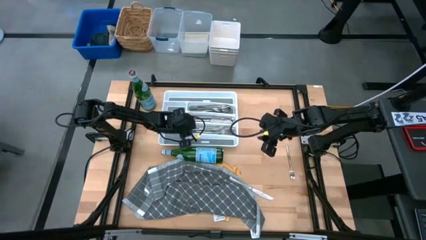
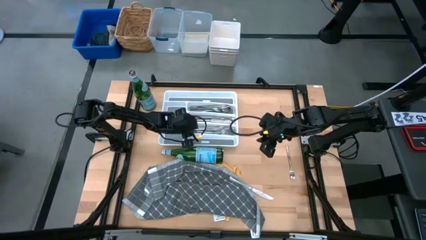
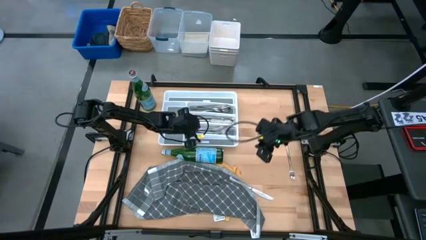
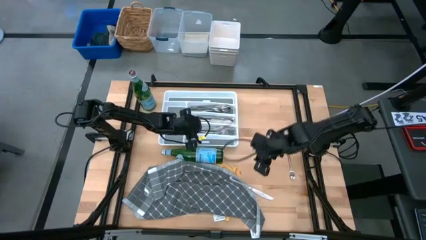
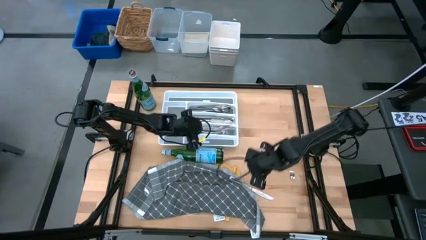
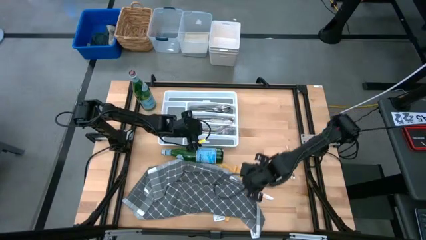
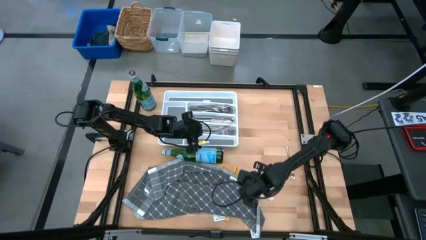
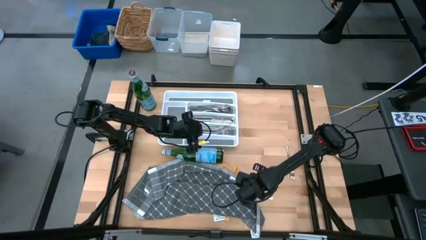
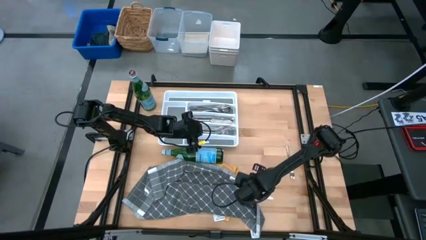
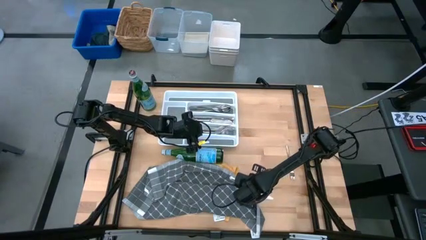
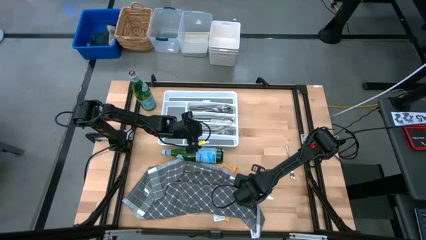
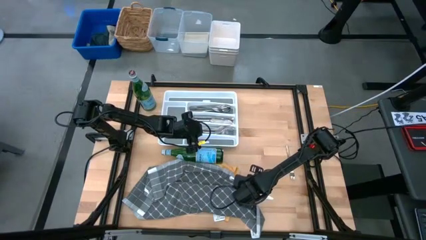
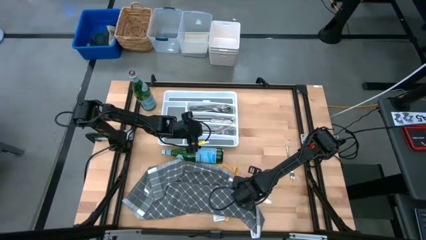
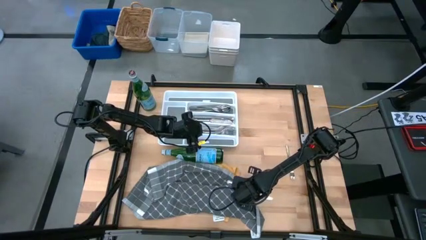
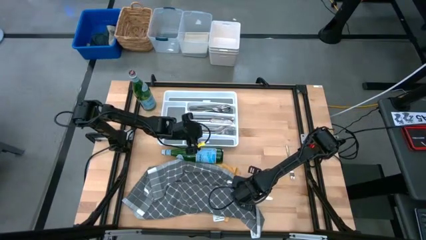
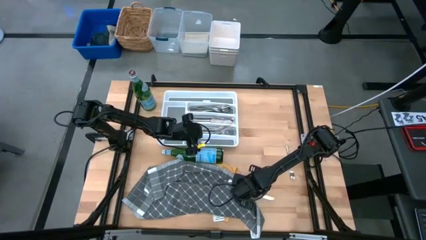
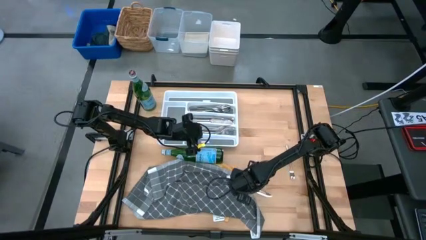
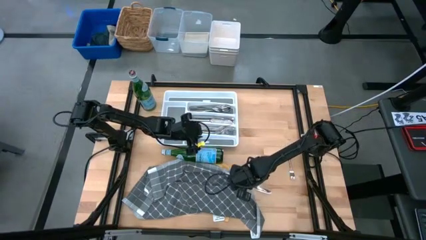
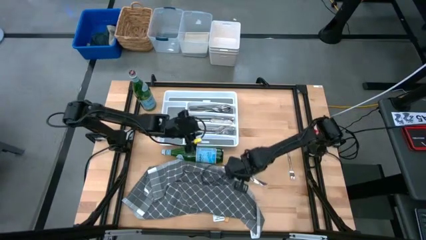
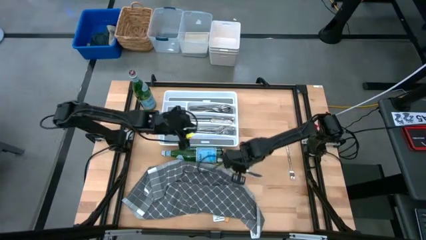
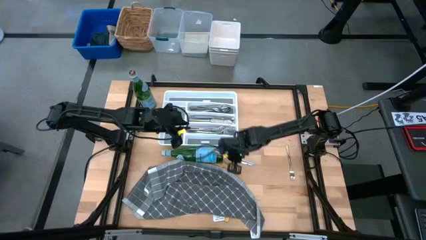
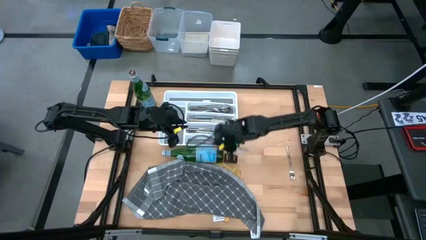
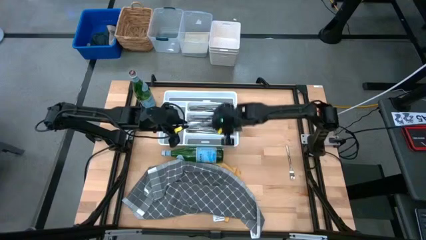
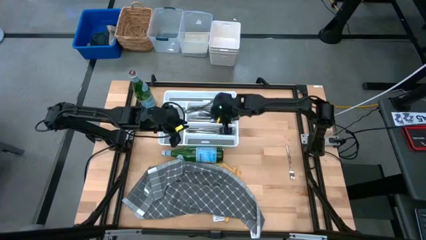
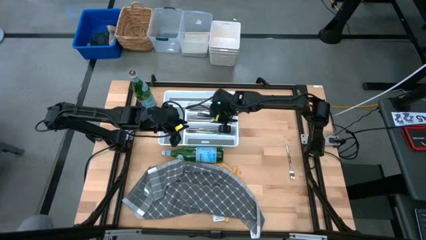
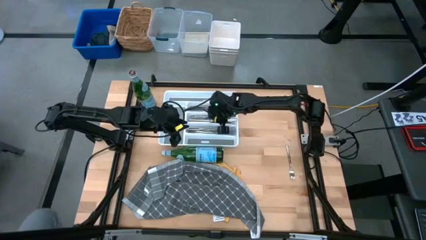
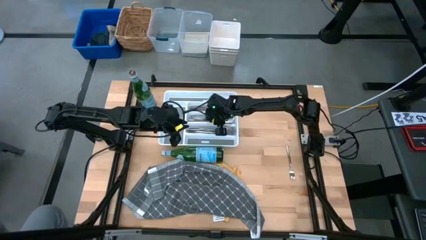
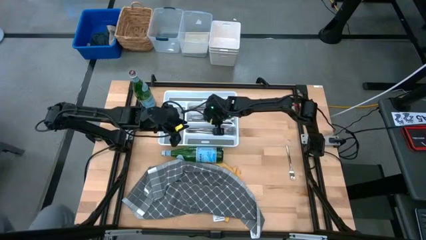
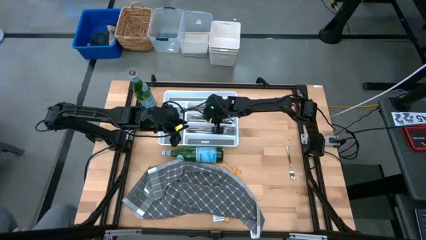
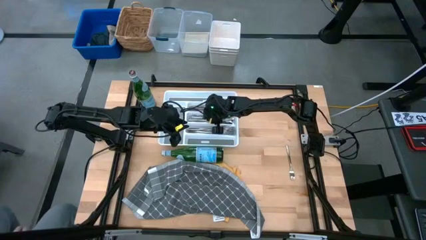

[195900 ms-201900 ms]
Task: Sort silverware
Put the silver table knife into the silverware tray

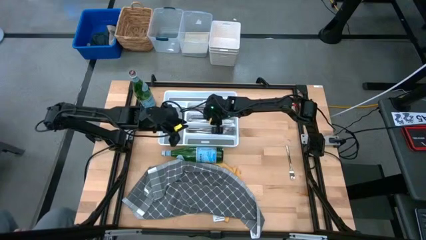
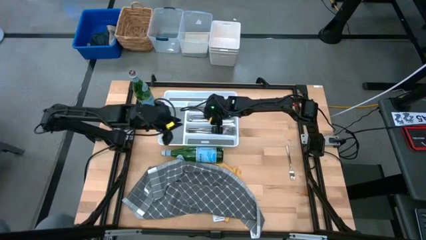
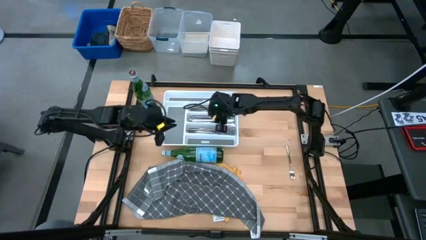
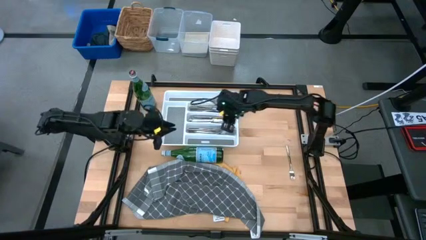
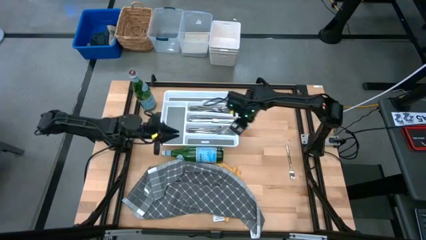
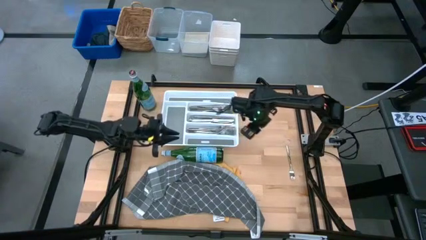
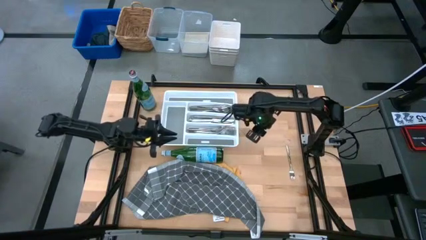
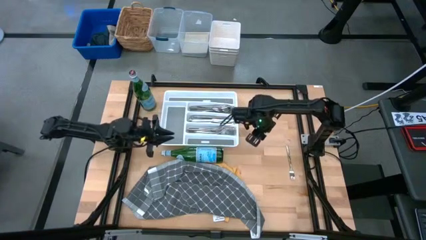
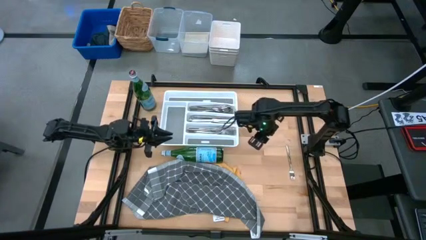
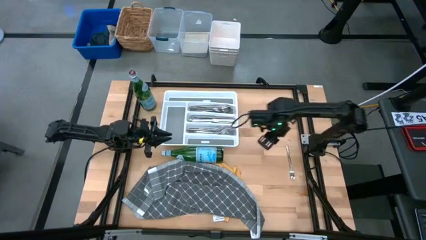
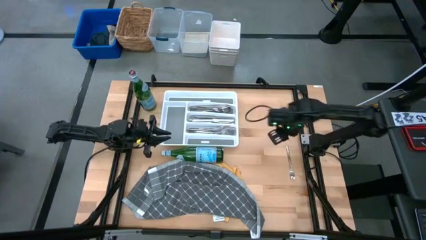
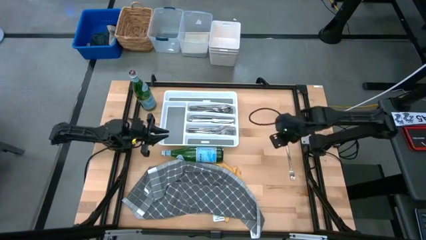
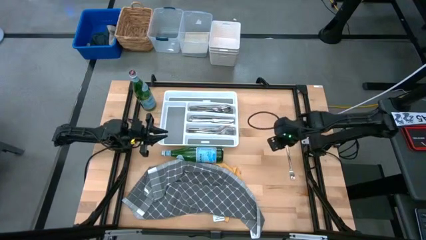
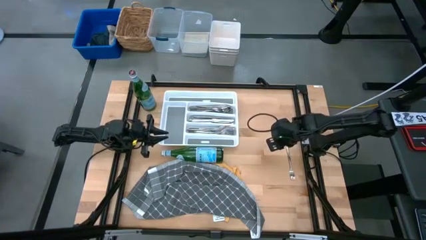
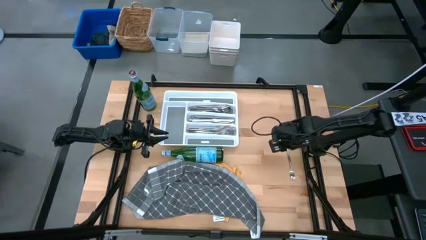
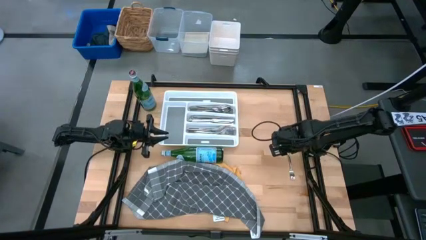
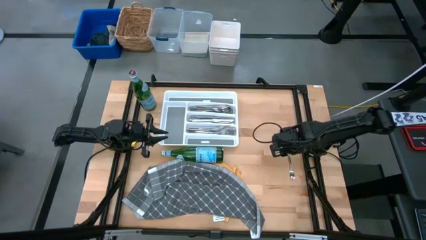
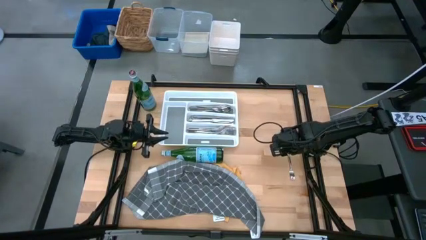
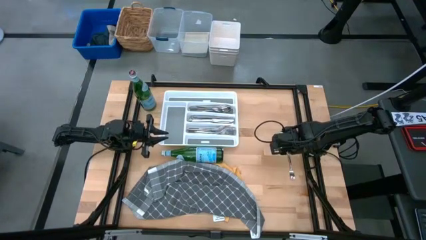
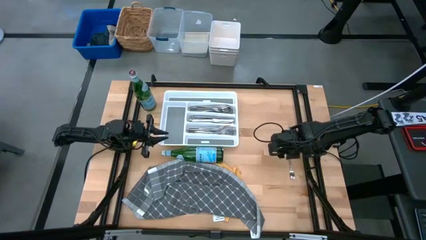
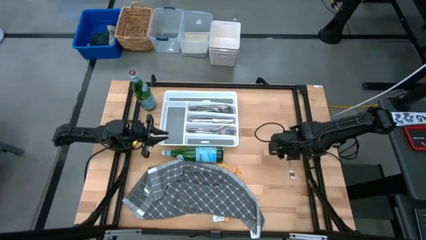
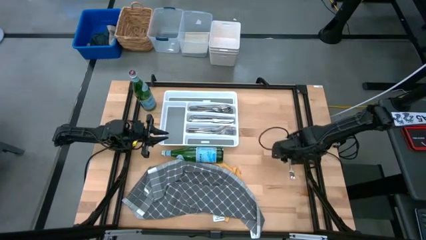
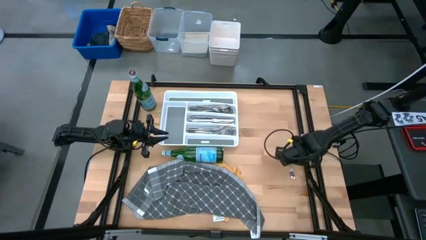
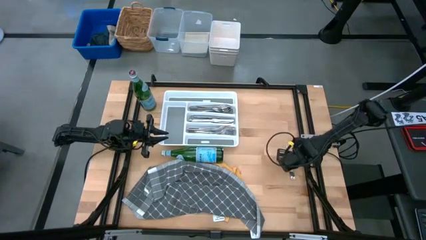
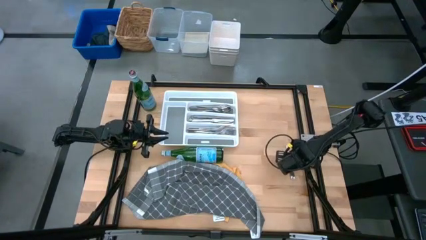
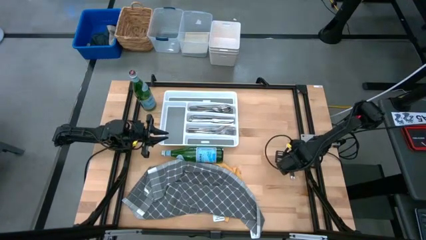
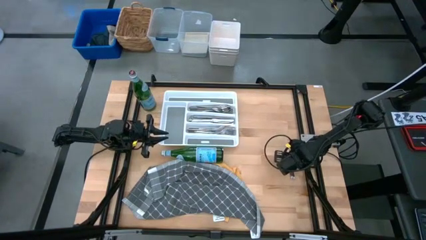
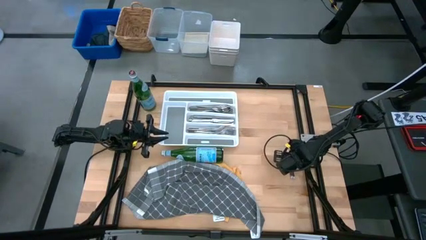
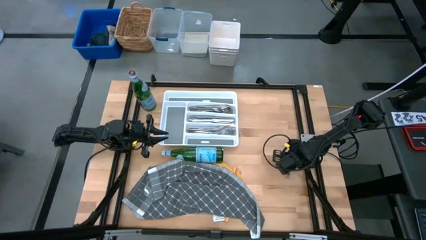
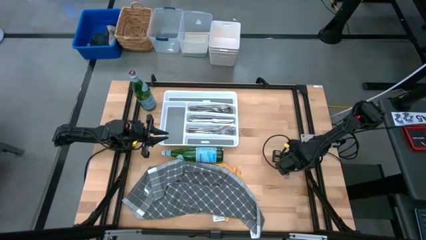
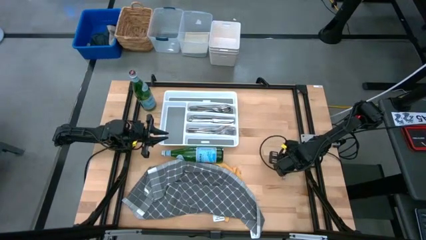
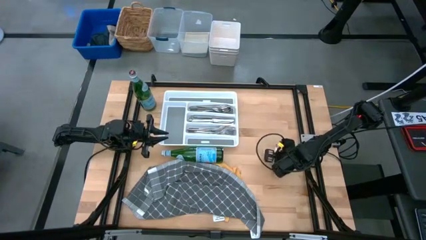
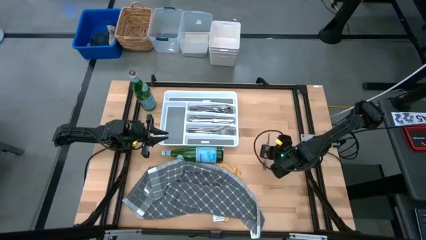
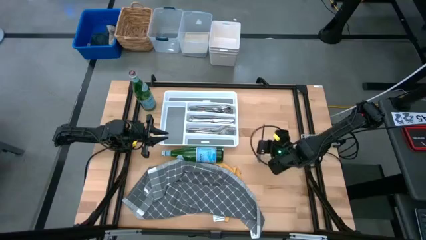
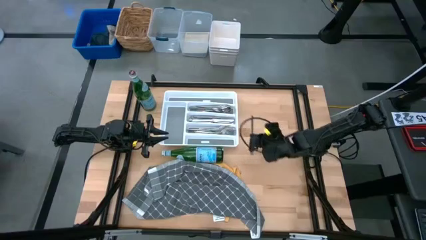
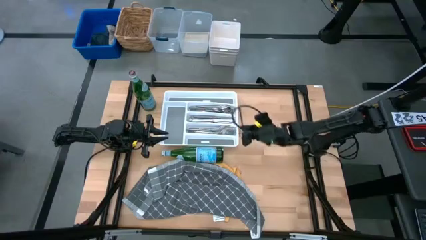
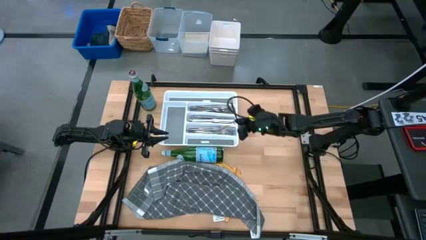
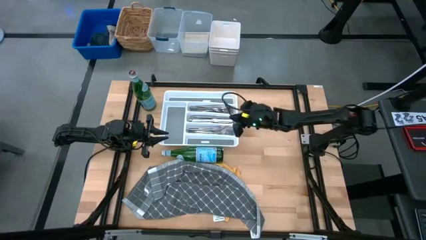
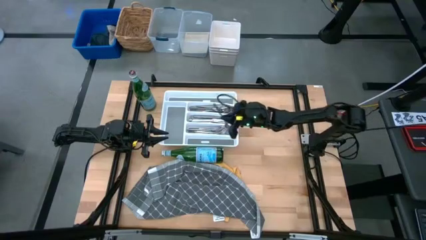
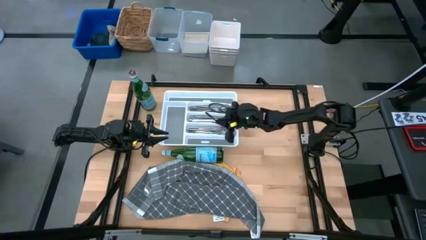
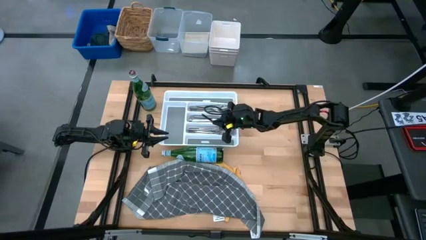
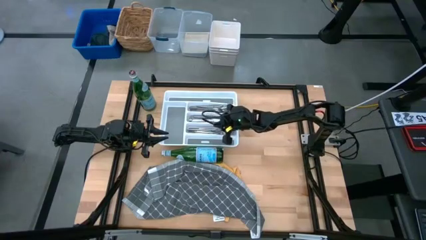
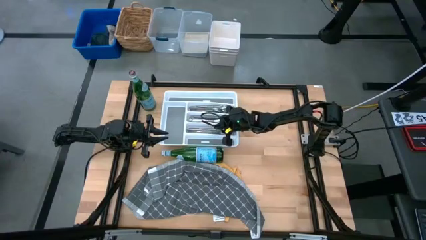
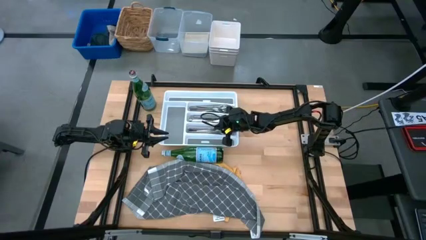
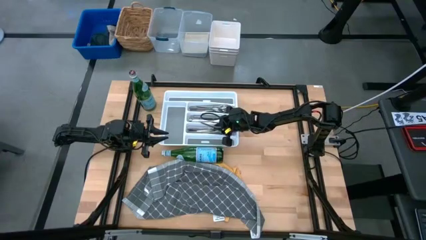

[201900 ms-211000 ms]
Put the silver fork into the silverware tray
